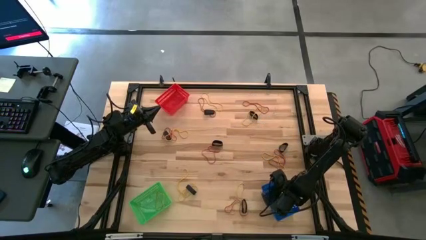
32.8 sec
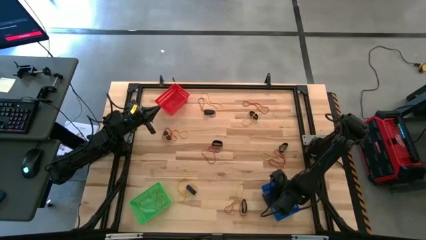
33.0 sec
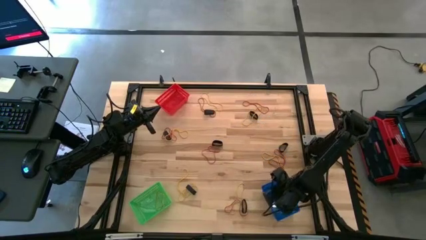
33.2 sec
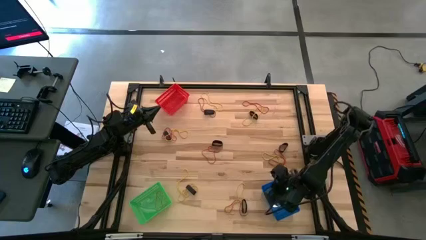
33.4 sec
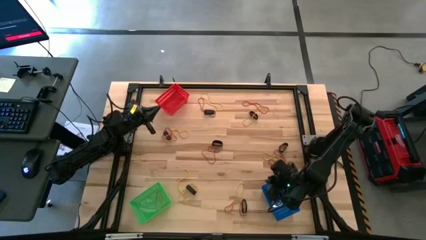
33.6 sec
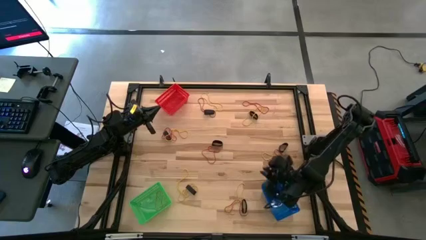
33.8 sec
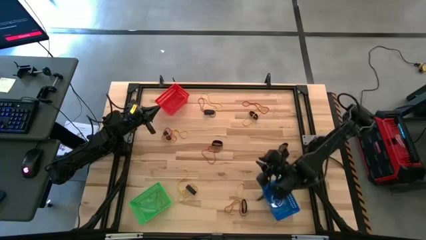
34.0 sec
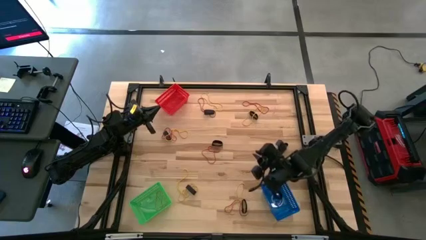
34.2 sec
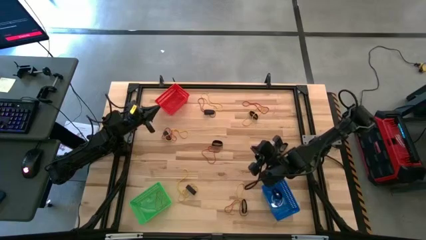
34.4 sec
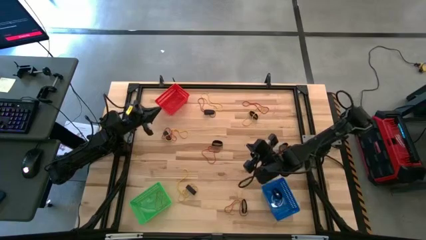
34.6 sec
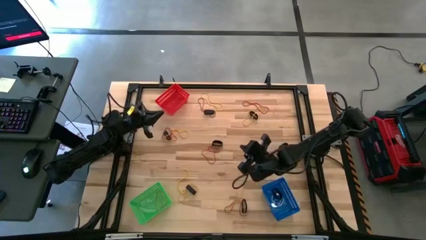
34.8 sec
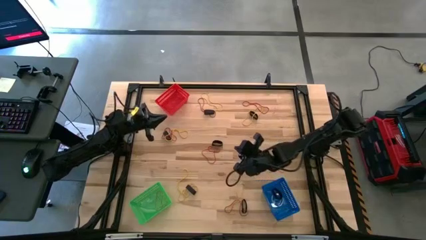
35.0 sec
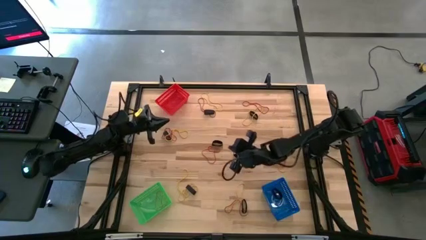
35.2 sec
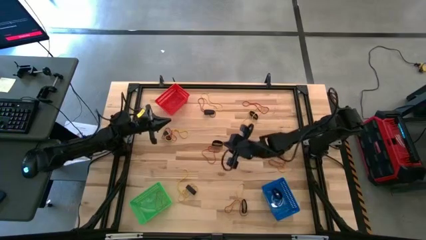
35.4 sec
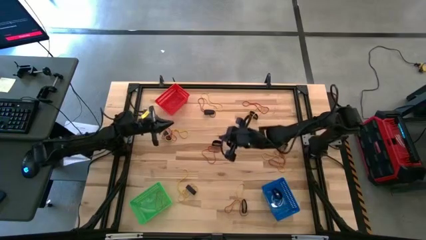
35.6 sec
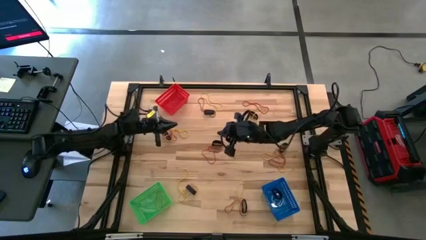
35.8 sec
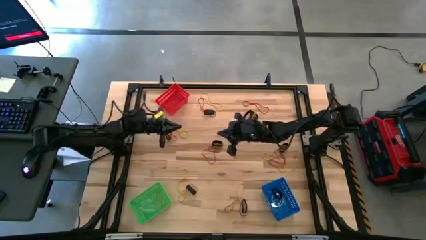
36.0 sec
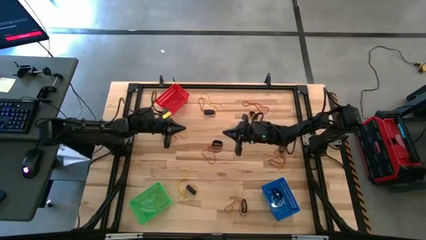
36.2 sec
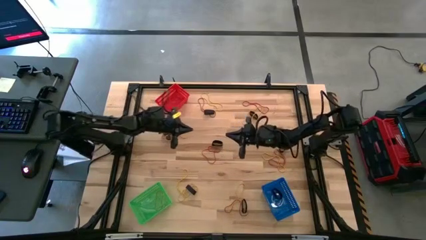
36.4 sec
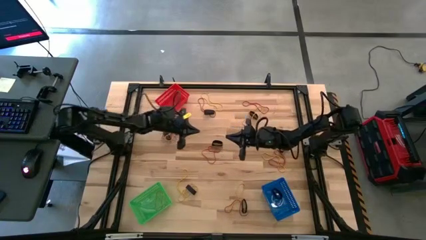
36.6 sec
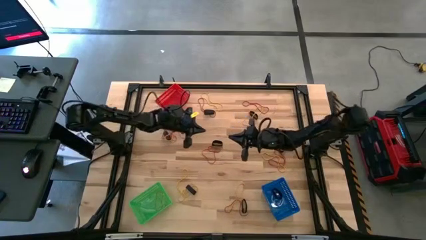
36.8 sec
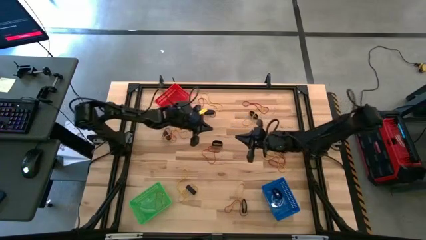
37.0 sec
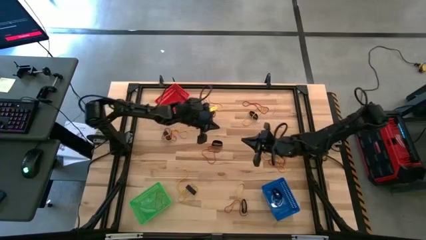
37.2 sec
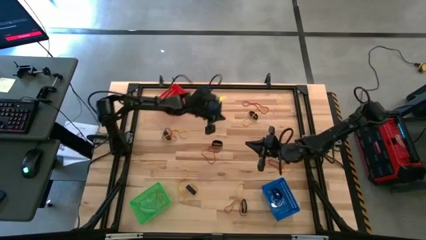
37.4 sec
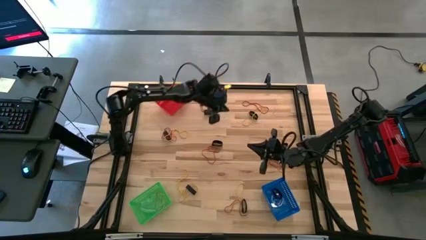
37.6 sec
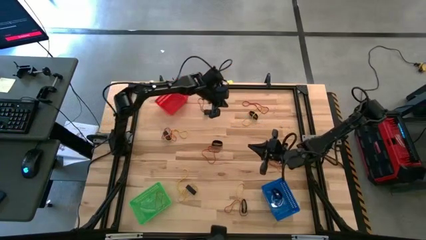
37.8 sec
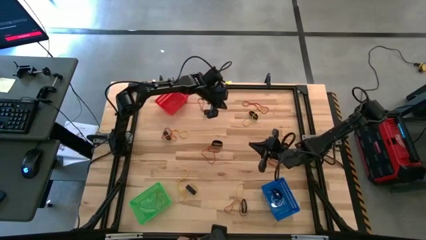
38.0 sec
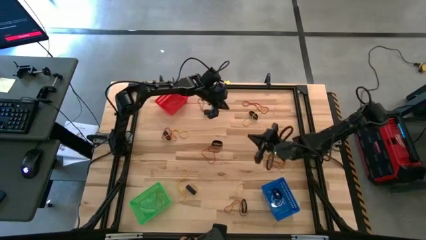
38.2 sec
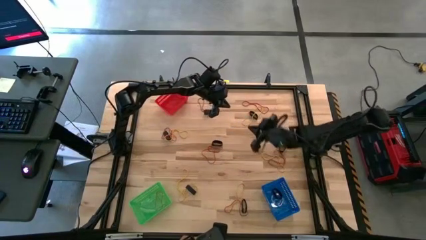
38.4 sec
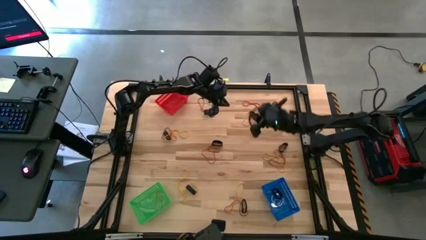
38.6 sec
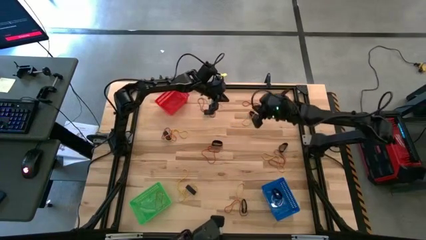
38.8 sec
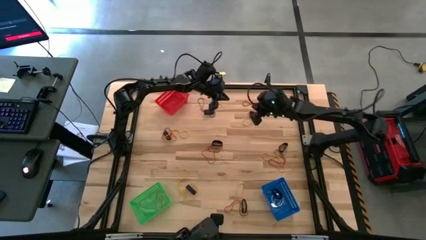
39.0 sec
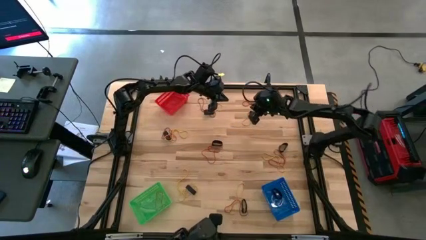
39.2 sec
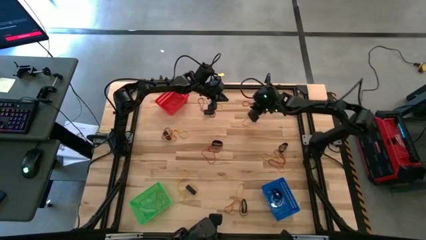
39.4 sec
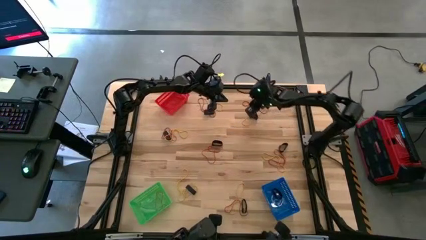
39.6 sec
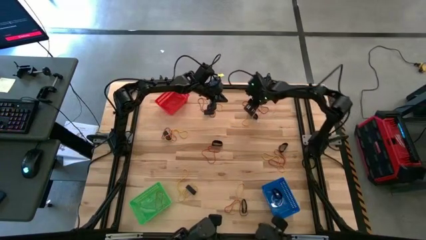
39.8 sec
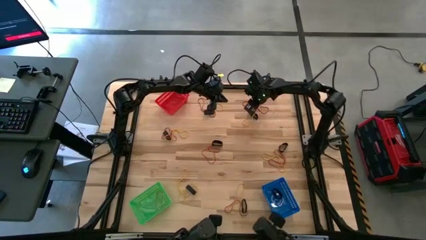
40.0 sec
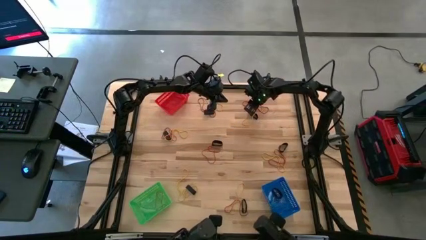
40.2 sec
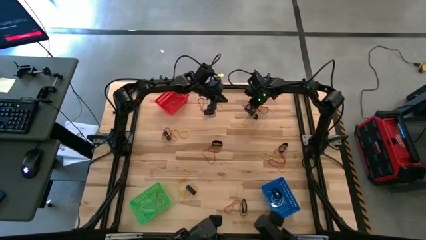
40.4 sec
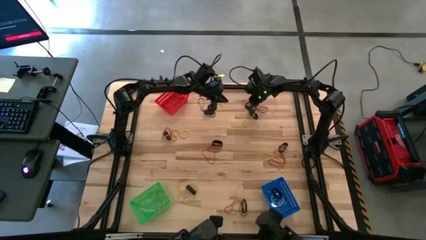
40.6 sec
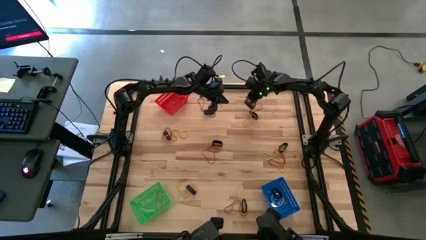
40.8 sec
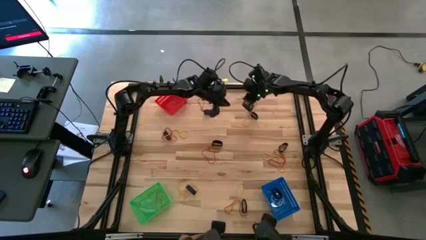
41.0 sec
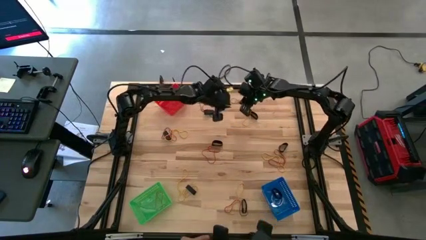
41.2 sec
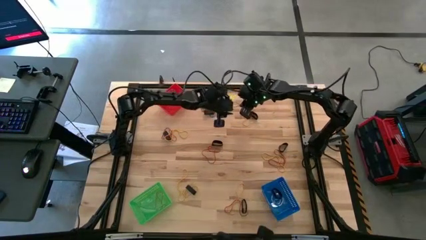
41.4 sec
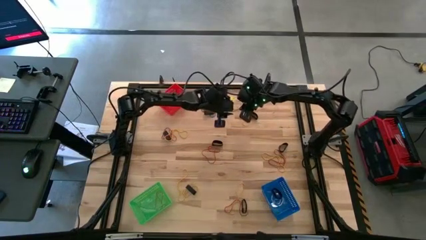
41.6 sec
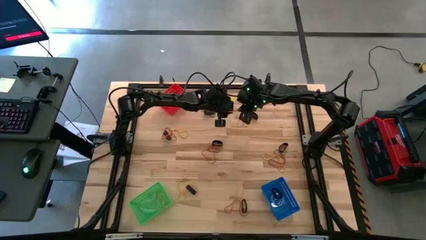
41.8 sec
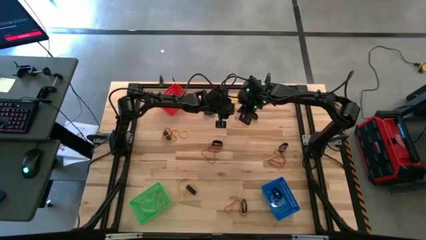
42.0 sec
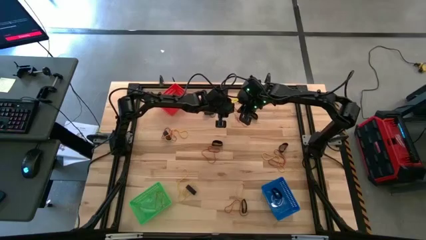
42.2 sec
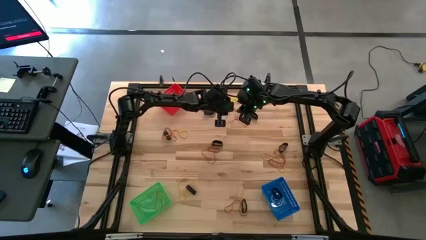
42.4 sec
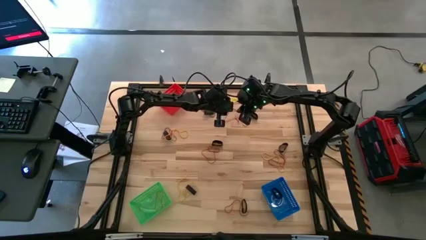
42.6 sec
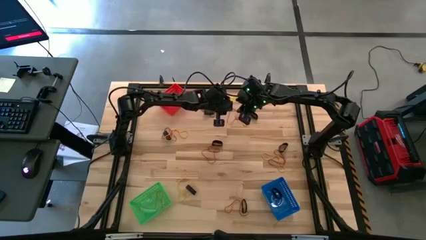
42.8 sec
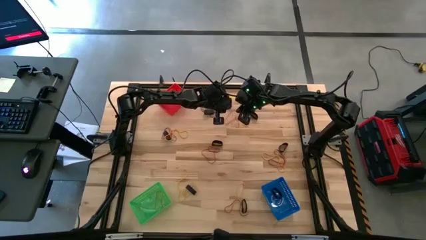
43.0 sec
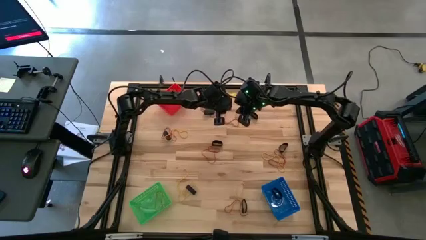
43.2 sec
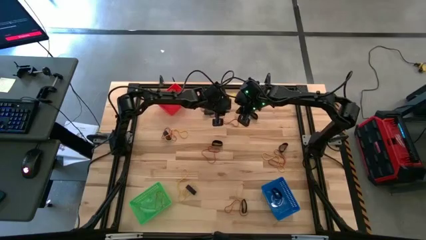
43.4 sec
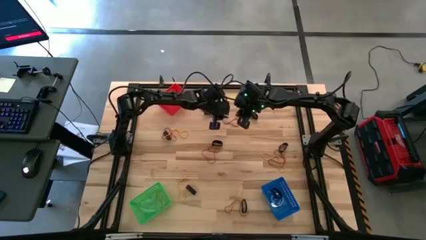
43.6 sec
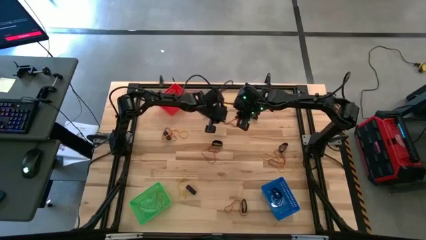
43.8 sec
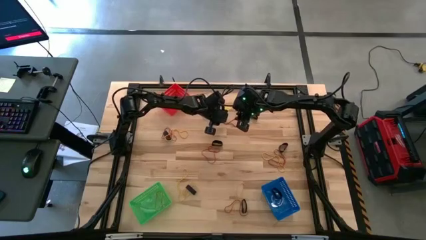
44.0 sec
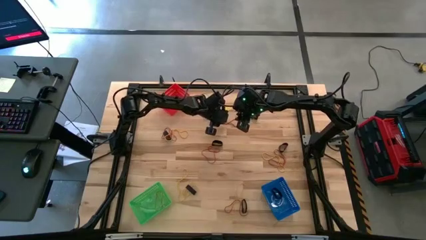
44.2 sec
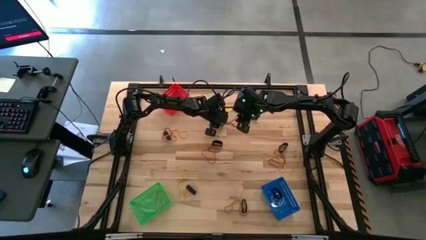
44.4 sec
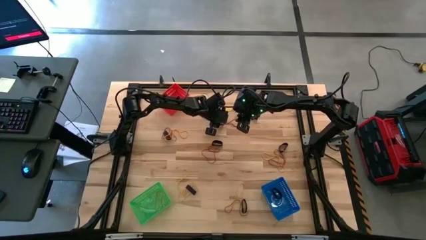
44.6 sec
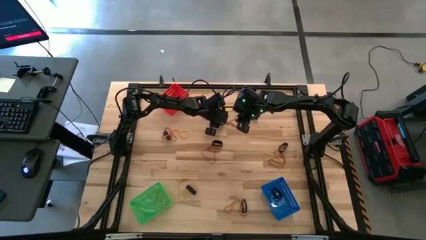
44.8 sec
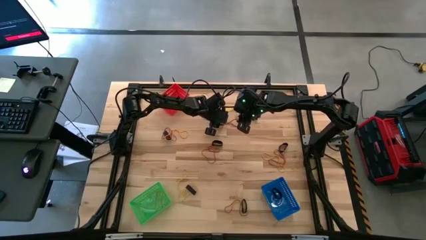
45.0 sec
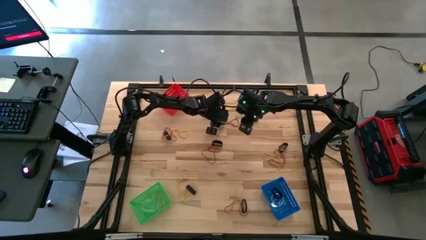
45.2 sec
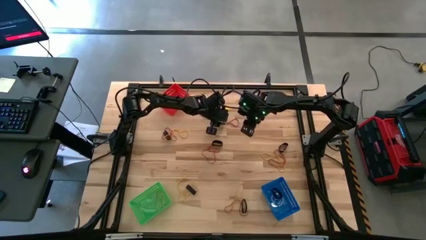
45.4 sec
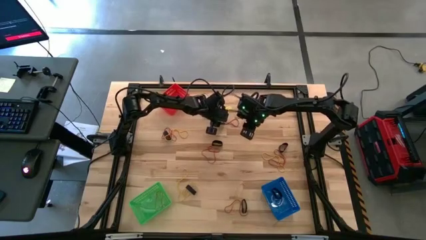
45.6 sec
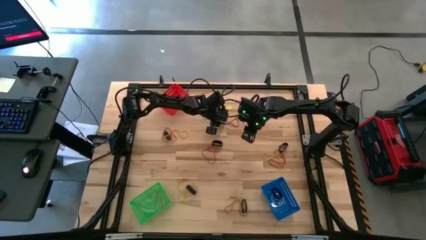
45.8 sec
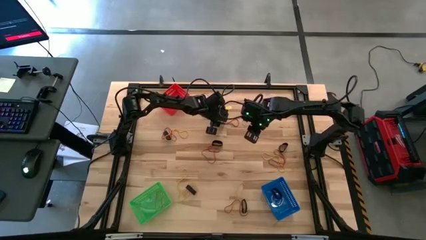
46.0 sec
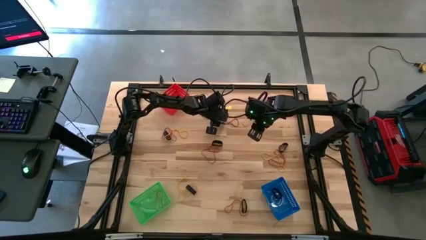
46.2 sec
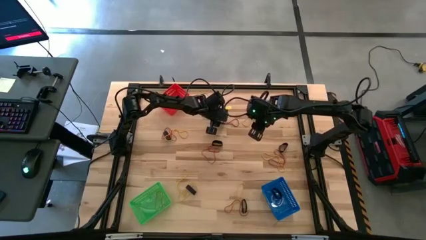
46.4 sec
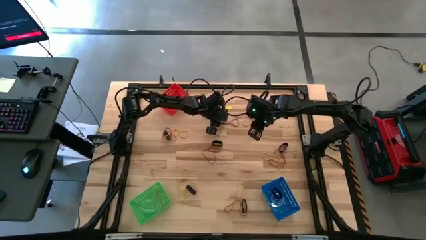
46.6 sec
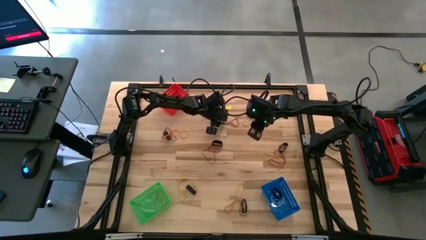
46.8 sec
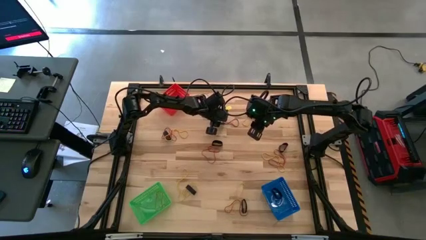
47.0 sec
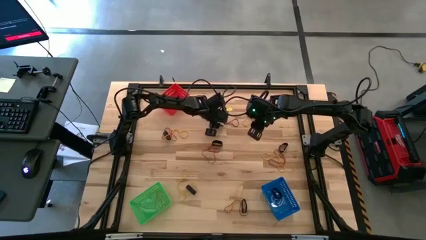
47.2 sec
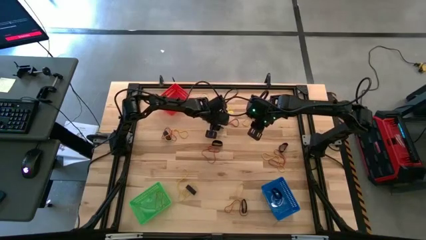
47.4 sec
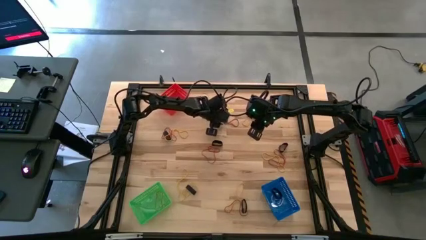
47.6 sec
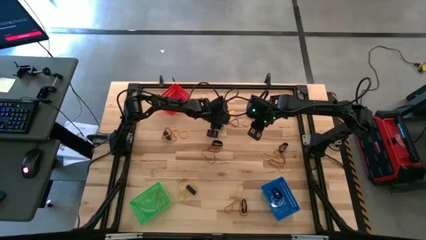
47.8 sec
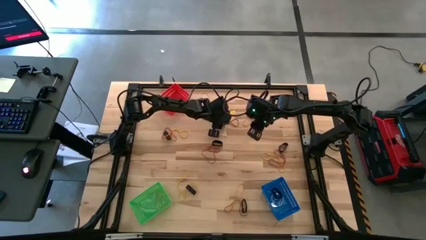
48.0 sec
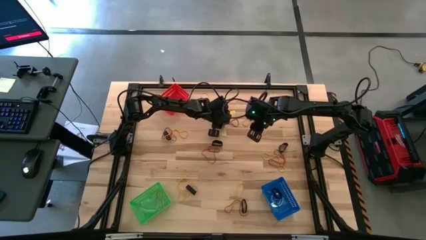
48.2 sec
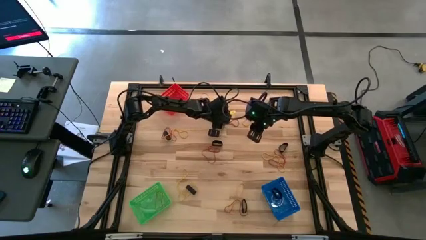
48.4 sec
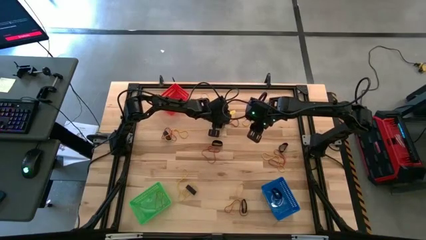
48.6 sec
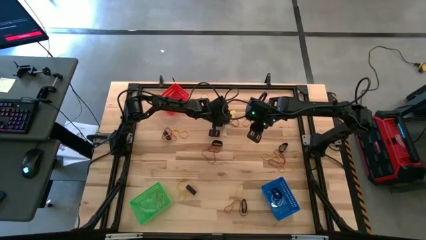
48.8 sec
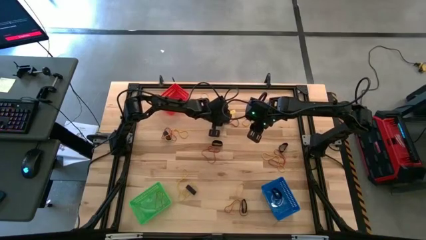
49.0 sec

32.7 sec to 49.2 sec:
Task: Sort rubber bands into baskets
Put the red rubber band into the red basket
